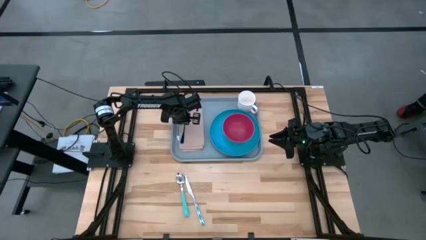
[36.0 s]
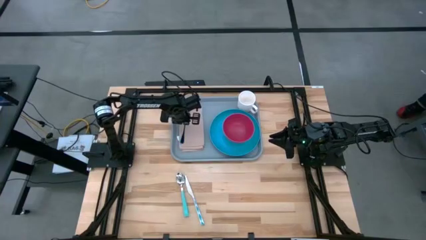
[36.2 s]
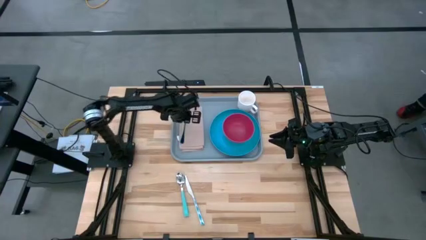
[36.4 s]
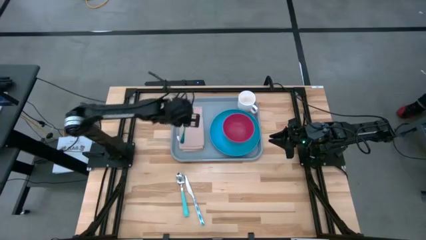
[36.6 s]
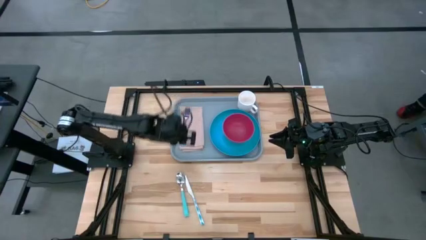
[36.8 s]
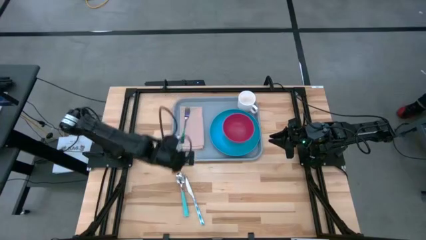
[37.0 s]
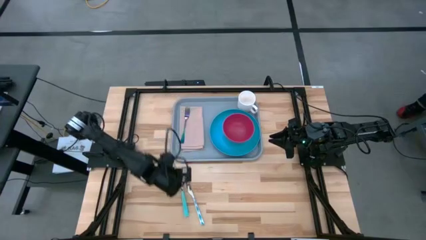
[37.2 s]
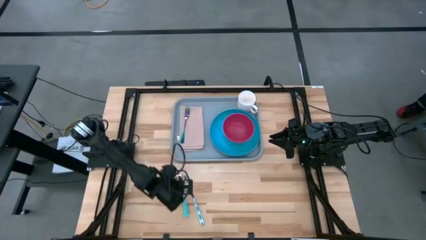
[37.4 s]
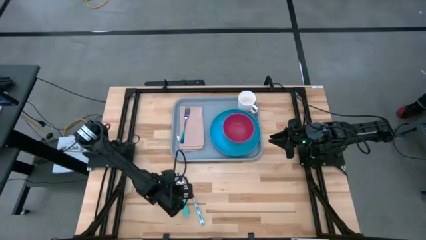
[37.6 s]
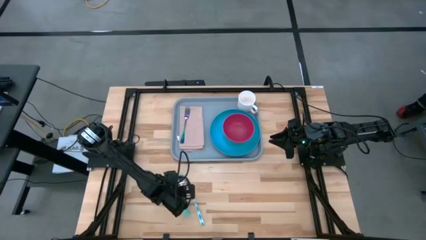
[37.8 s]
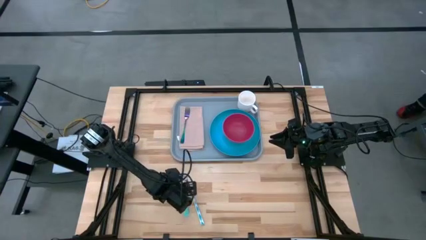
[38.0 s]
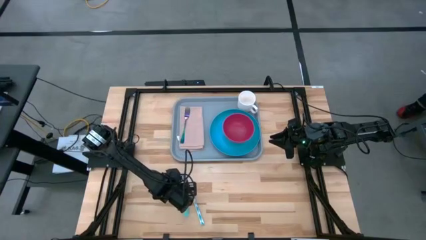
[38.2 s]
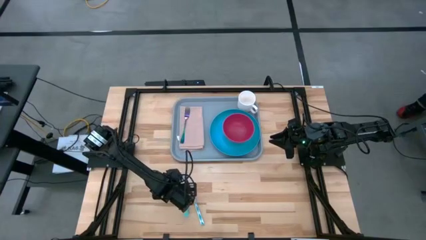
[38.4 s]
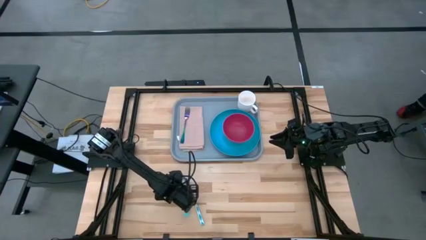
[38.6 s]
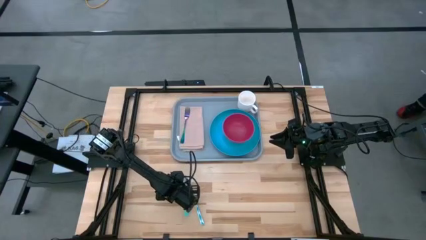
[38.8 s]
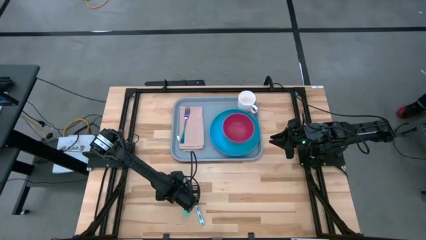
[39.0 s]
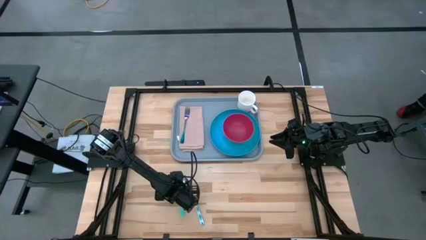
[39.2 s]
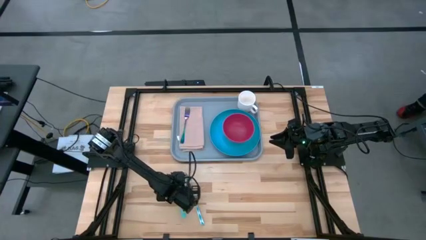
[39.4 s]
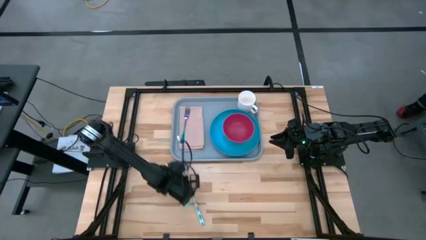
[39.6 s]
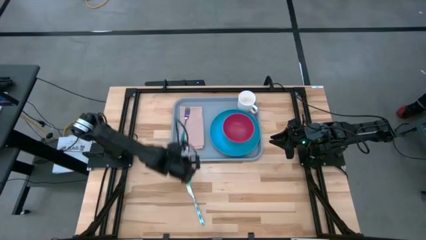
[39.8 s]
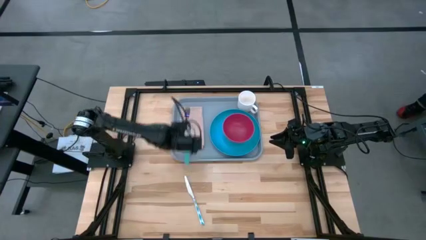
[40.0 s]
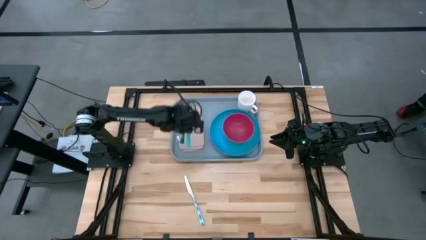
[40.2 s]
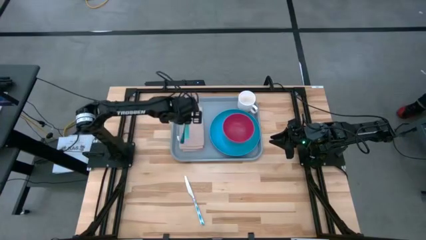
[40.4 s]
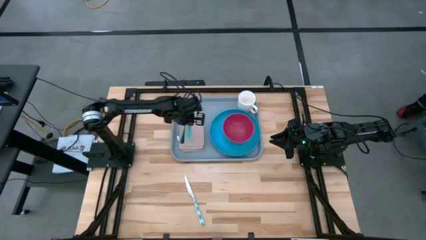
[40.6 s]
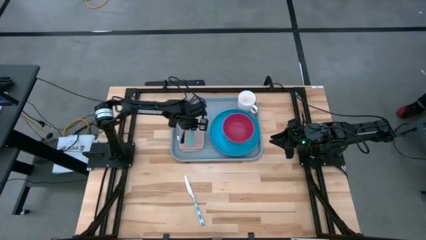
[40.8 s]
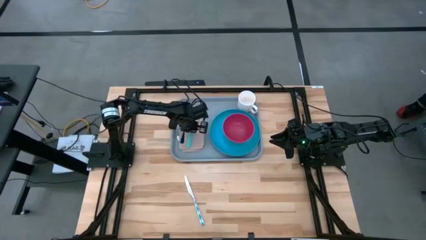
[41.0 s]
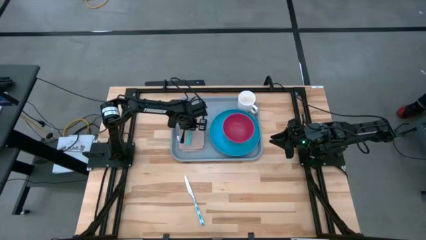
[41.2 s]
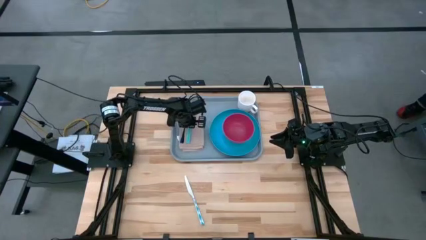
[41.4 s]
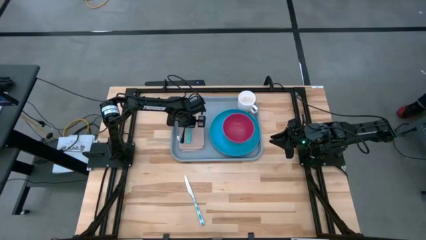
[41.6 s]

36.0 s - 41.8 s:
Task: Set up tray
Put the blue spoon to the right of the blue fork on the gray napkin on the blue tray

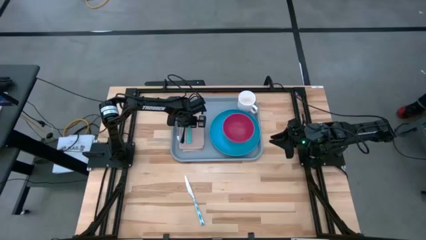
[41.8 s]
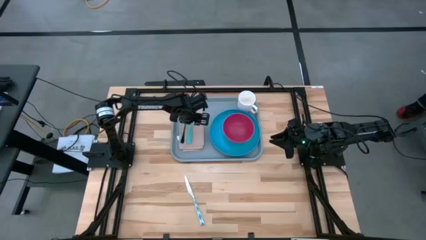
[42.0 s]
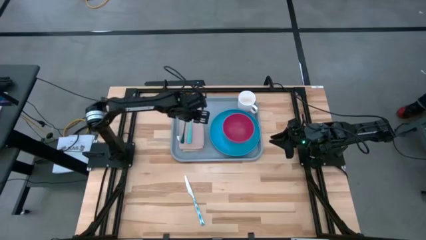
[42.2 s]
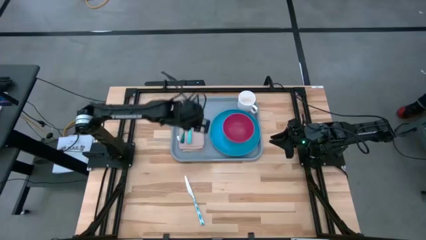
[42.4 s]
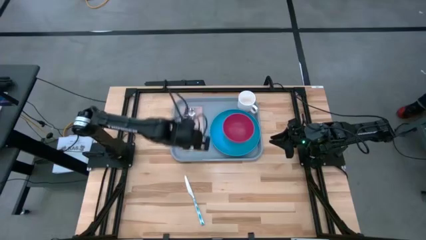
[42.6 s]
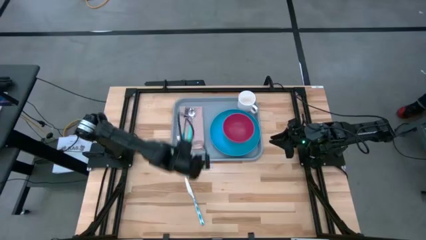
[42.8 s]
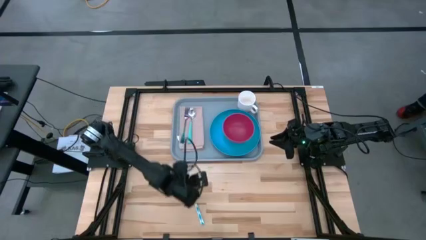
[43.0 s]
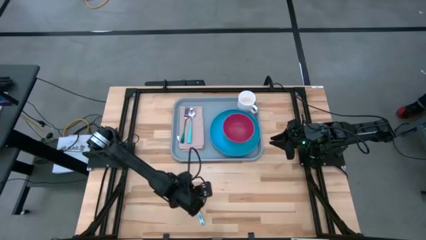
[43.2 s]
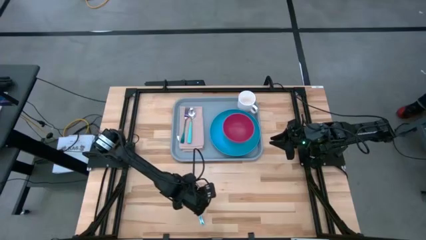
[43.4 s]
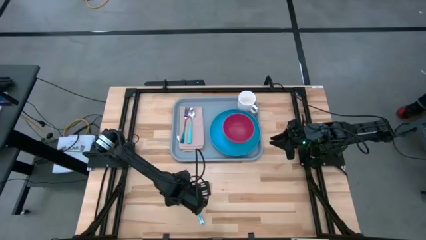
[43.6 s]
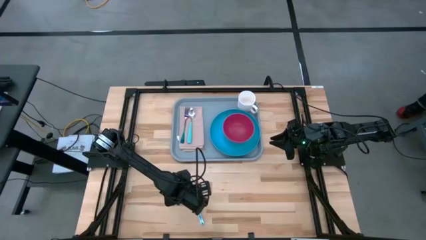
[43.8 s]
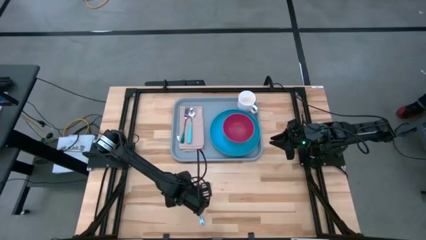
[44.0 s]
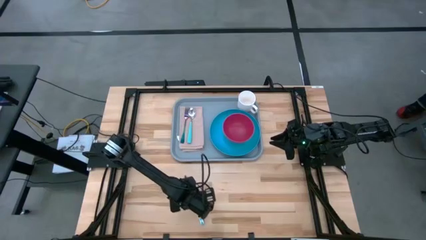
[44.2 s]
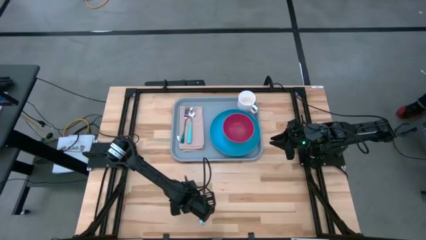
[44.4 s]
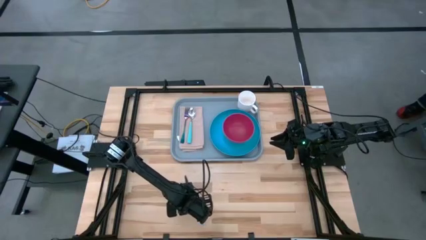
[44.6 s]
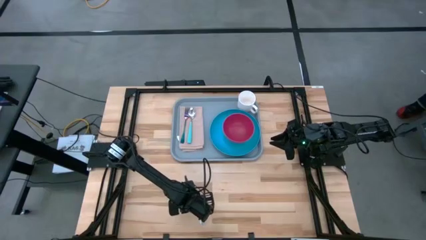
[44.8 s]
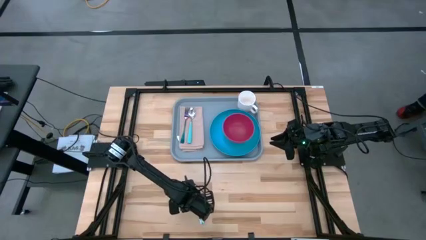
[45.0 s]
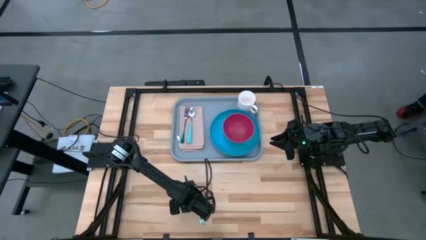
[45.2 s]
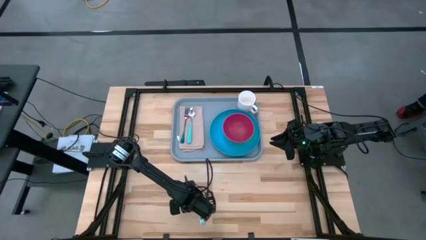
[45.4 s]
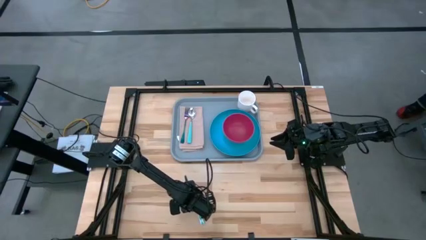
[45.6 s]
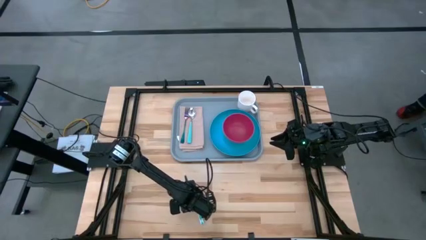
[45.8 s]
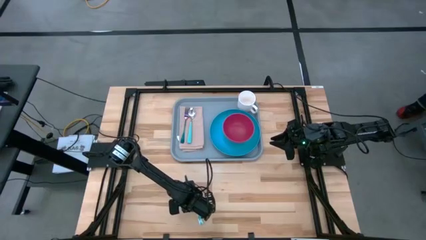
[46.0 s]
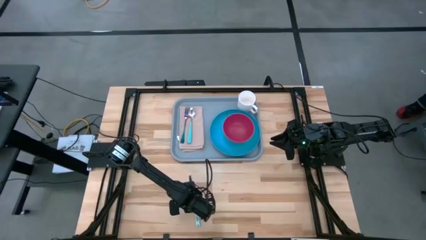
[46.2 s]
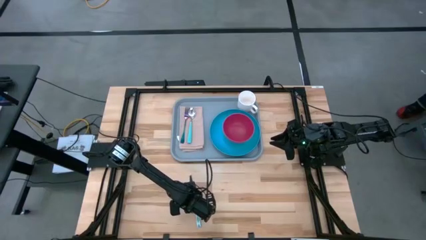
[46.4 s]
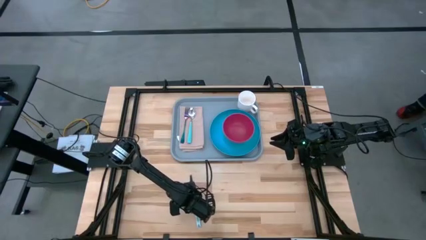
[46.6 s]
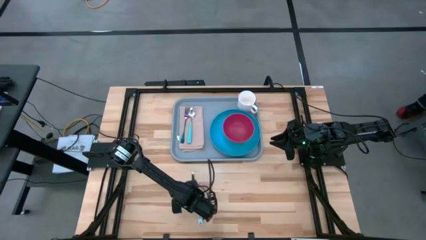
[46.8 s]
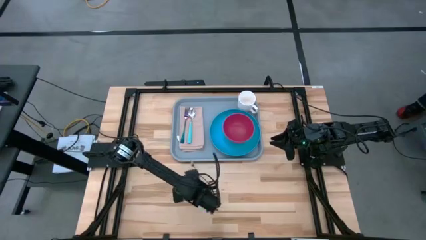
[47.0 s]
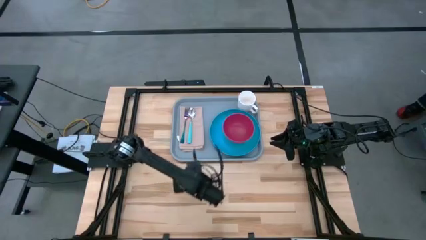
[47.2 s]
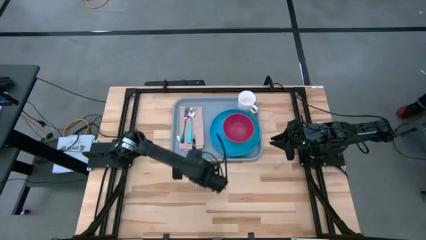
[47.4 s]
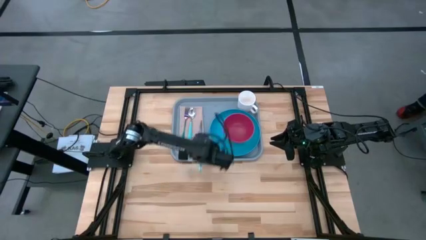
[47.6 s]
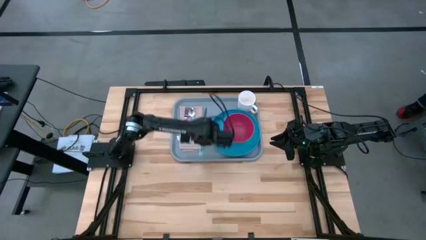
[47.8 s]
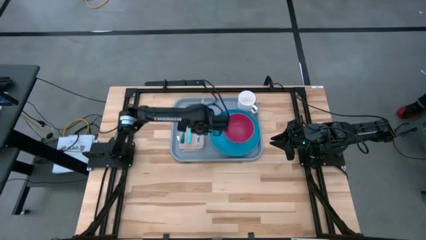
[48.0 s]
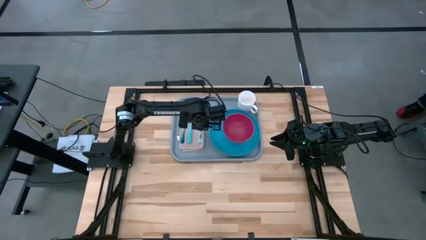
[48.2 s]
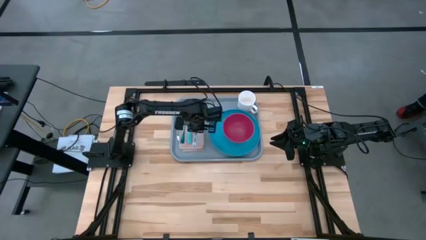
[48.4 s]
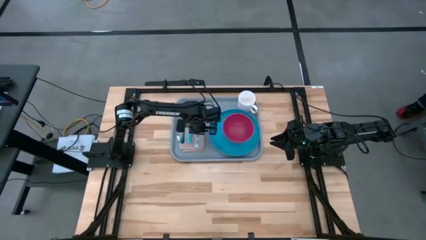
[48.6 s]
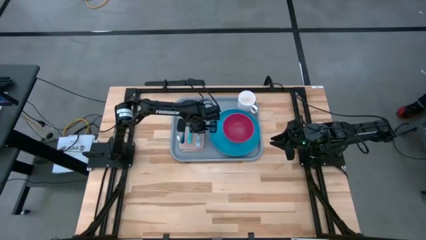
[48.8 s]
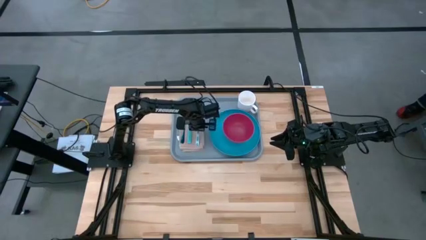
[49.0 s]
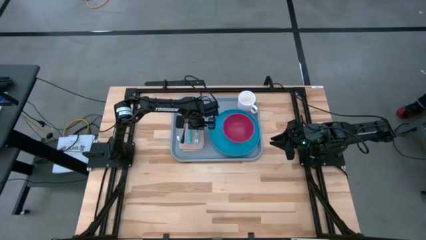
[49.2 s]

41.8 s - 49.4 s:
Put the blue and white knife to the right of the blue spoon on the gray napkin on the blue tray

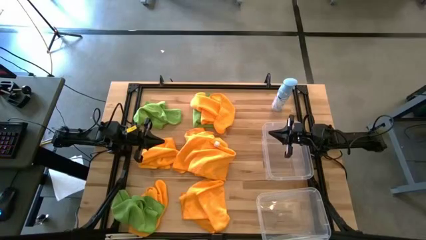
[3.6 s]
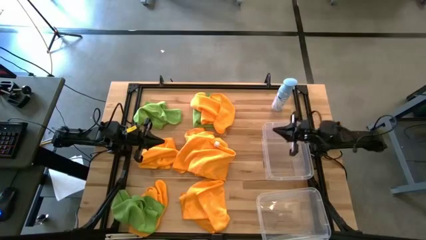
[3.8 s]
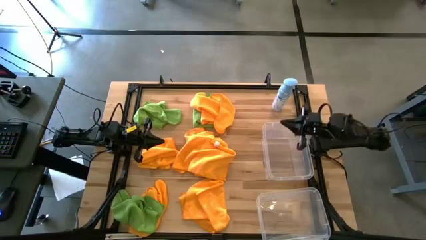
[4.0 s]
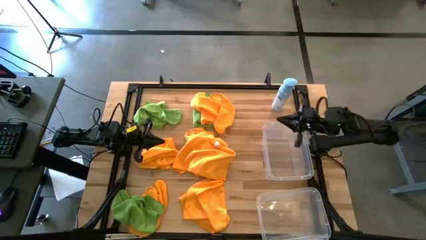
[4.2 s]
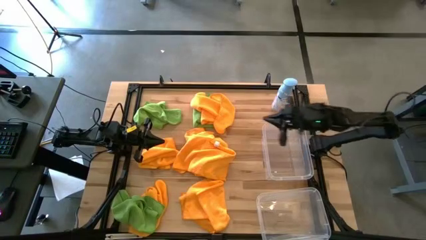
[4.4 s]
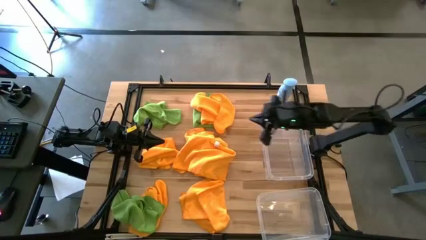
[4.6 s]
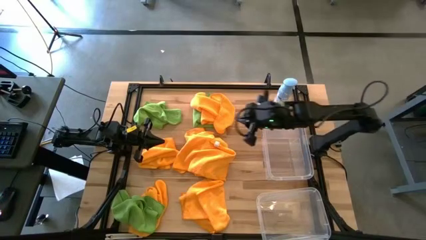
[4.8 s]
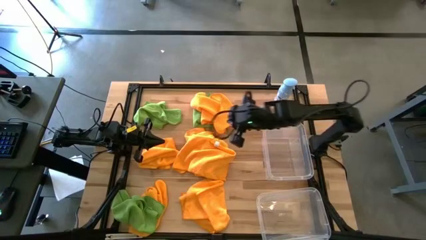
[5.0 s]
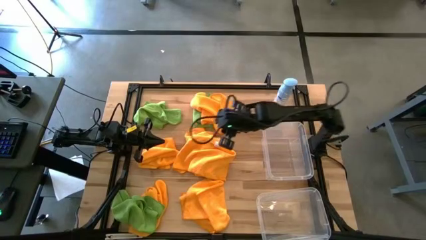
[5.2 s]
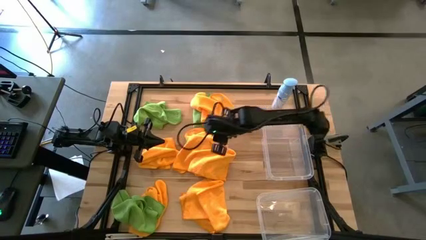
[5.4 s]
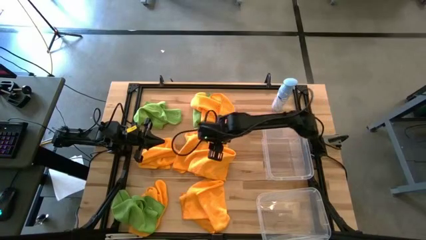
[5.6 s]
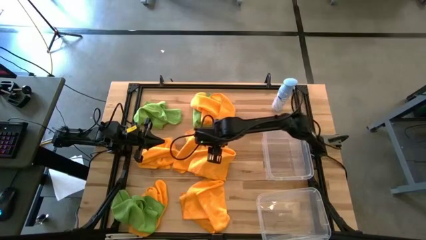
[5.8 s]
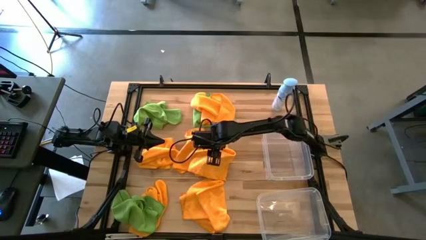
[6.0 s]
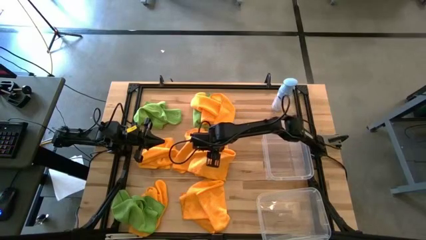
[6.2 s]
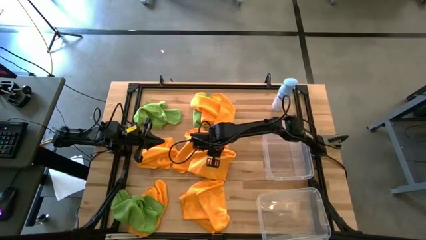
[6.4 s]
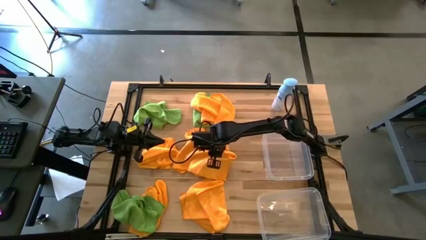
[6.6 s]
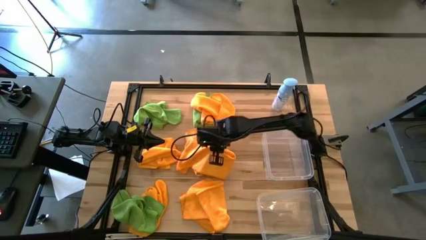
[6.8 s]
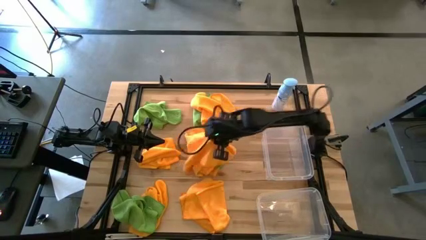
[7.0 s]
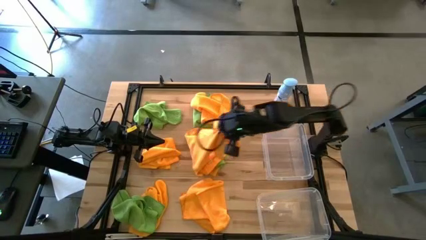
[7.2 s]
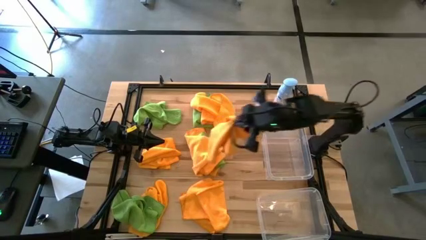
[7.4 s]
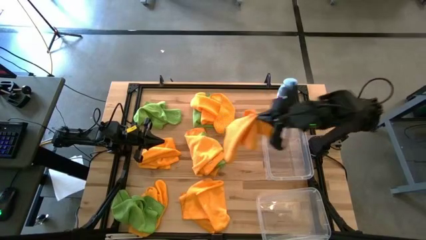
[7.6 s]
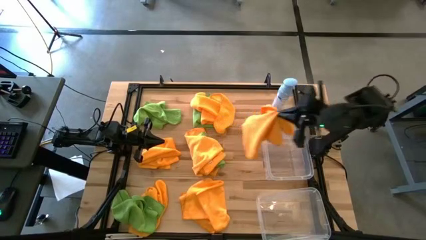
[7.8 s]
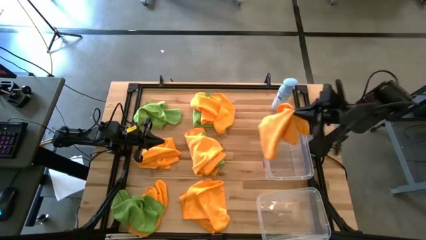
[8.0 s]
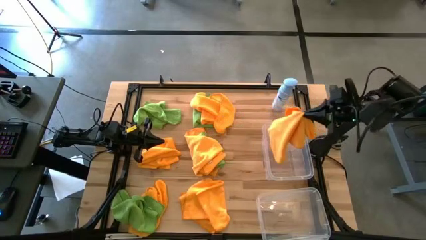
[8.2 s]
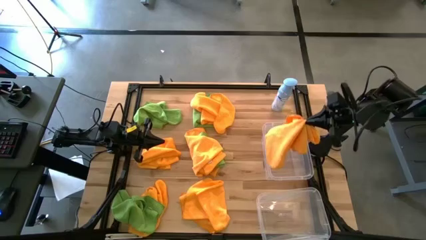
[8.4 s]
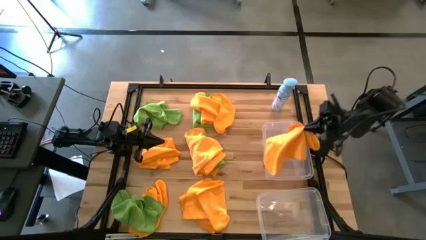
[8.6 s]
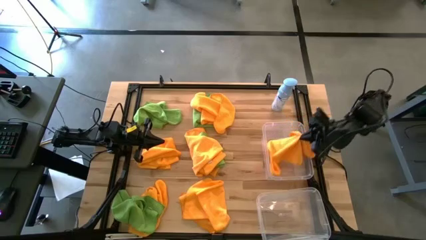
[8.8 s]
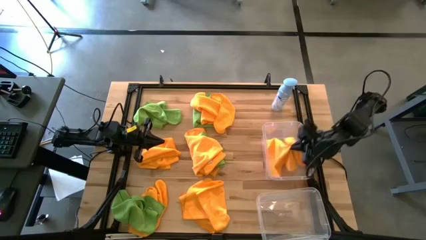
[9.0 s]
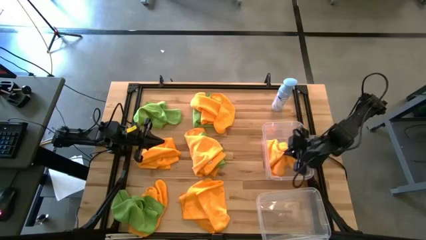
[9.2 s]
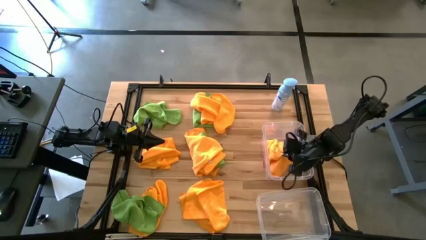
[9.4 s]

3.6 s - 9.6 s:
Task: Sort microfiber towel by color & place in baskets
Put the yellow towel into the top transparent bin
